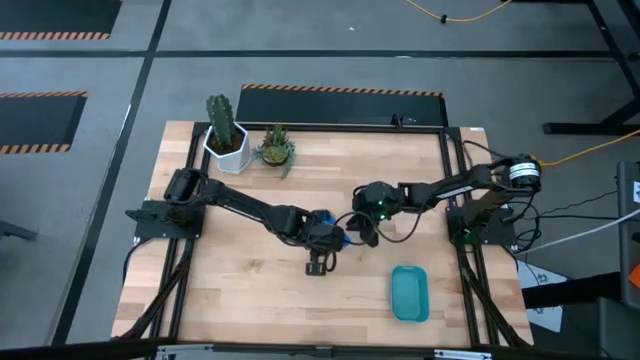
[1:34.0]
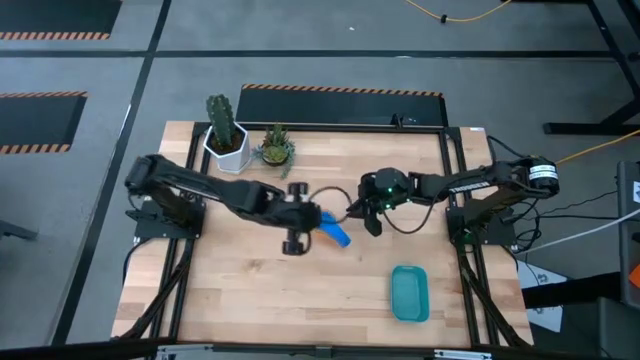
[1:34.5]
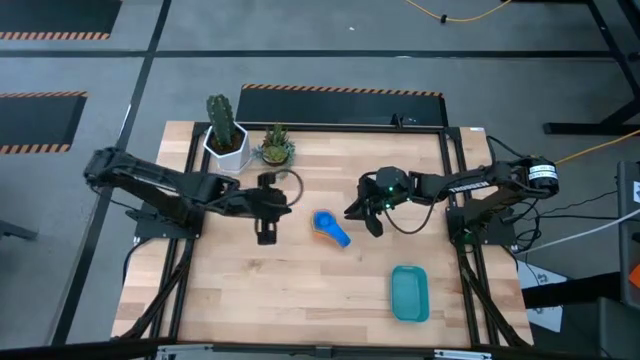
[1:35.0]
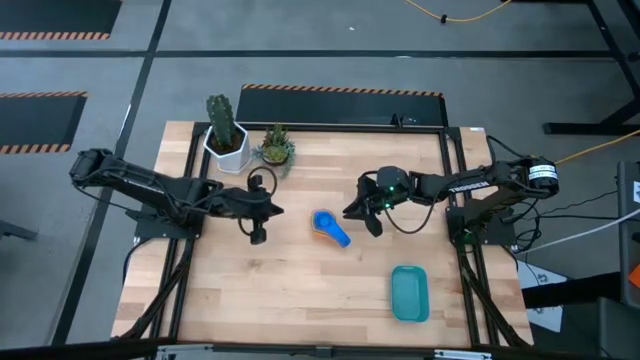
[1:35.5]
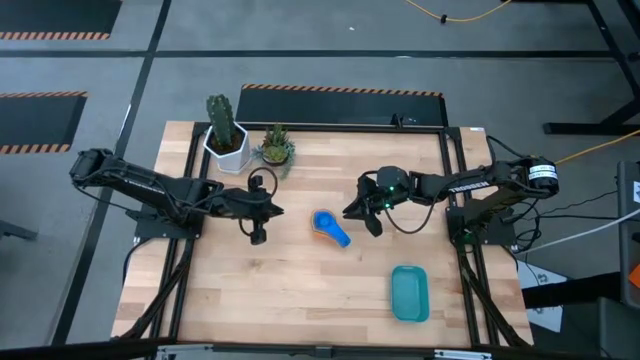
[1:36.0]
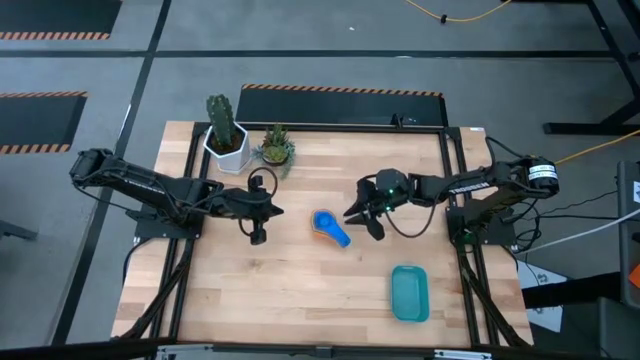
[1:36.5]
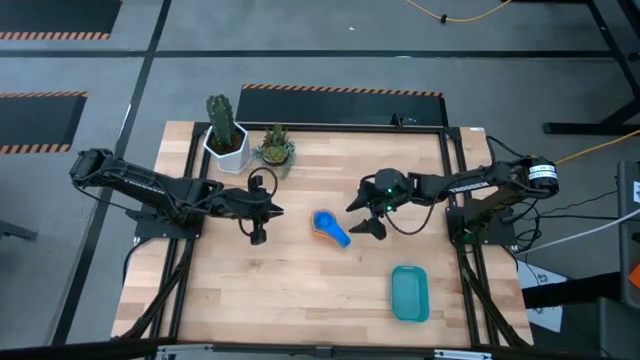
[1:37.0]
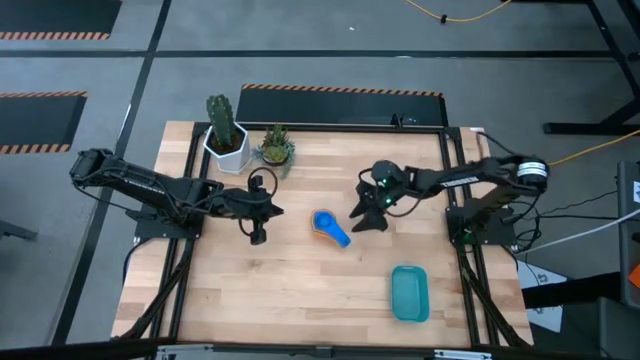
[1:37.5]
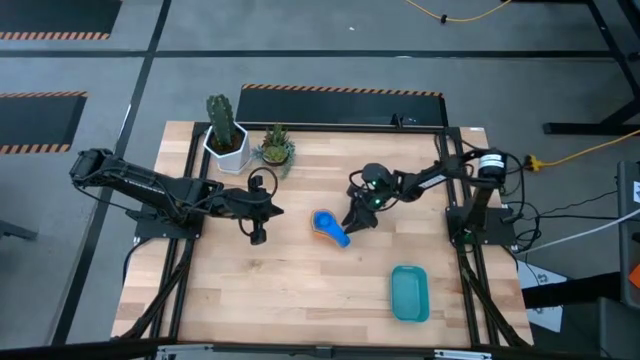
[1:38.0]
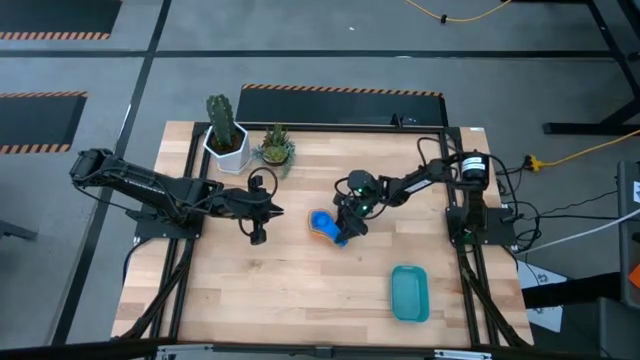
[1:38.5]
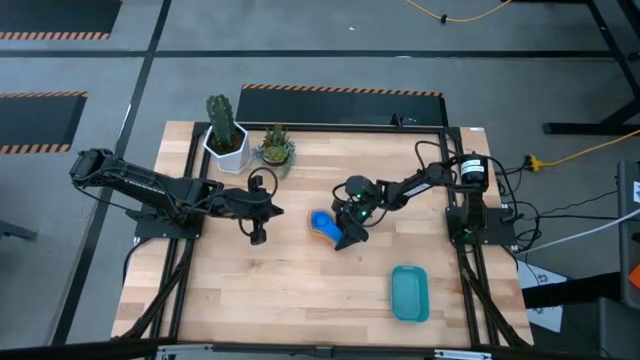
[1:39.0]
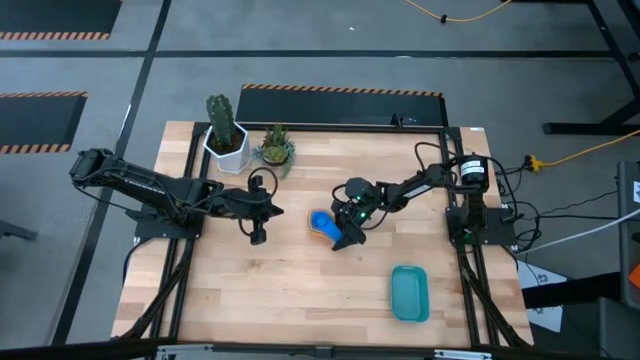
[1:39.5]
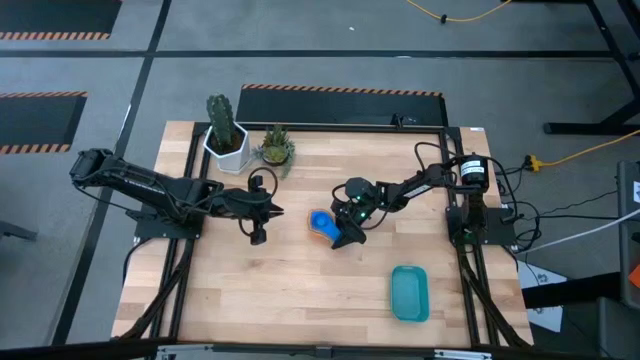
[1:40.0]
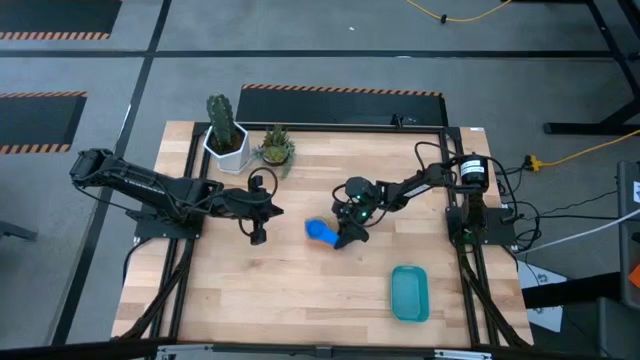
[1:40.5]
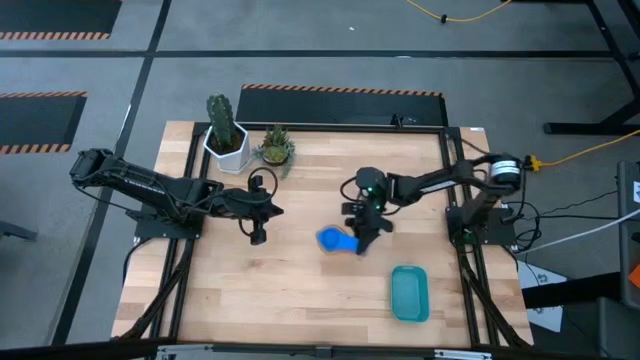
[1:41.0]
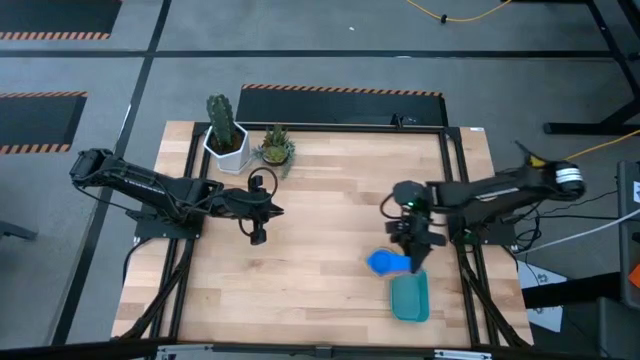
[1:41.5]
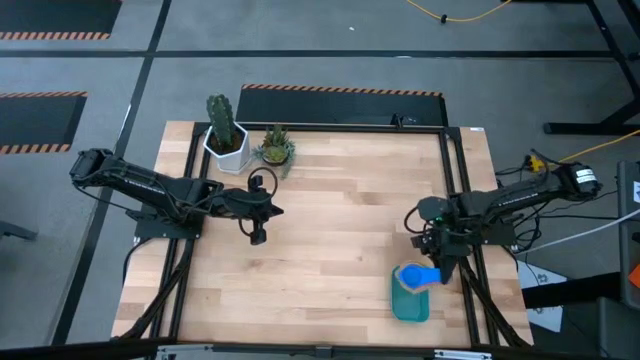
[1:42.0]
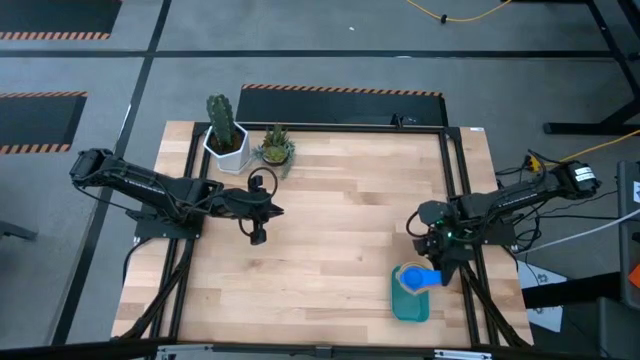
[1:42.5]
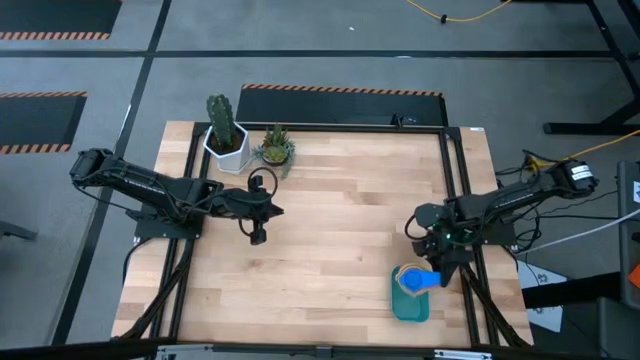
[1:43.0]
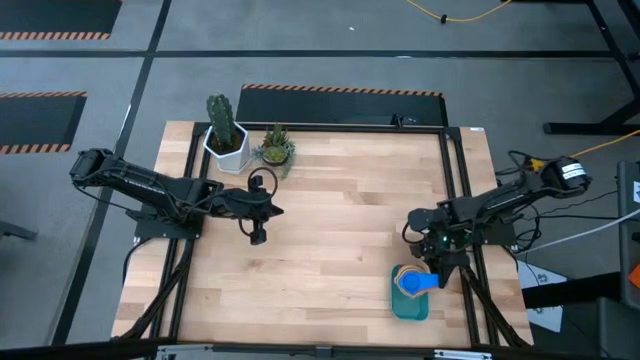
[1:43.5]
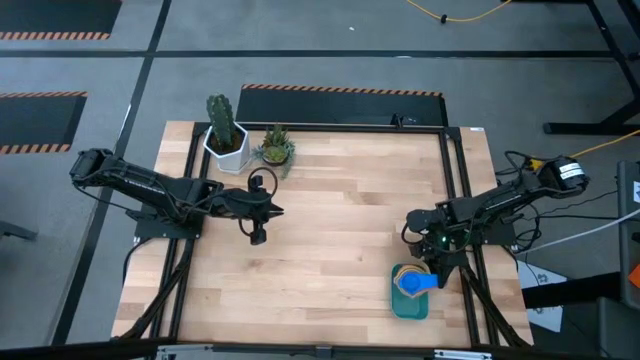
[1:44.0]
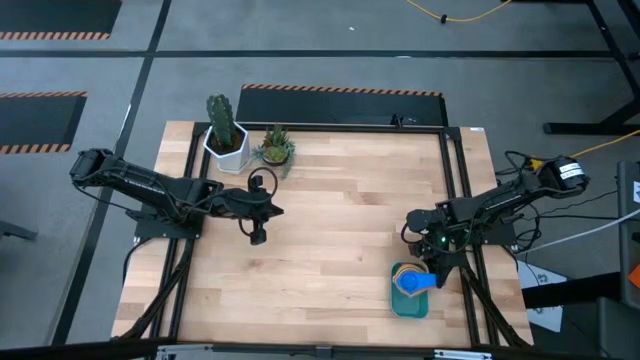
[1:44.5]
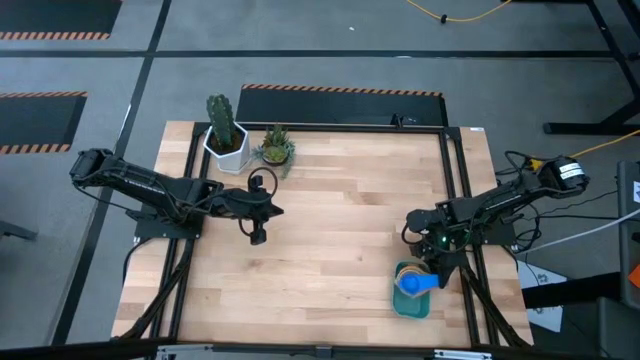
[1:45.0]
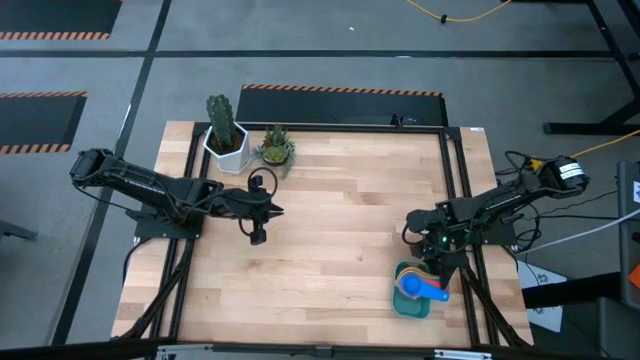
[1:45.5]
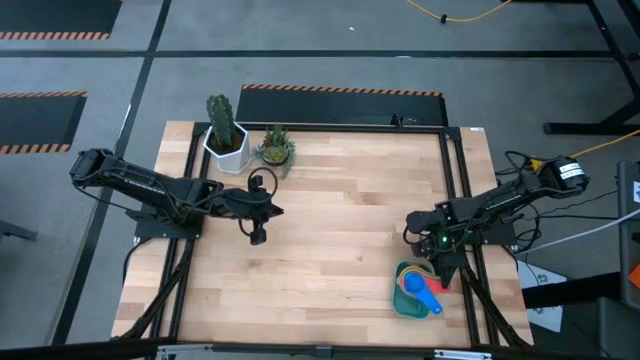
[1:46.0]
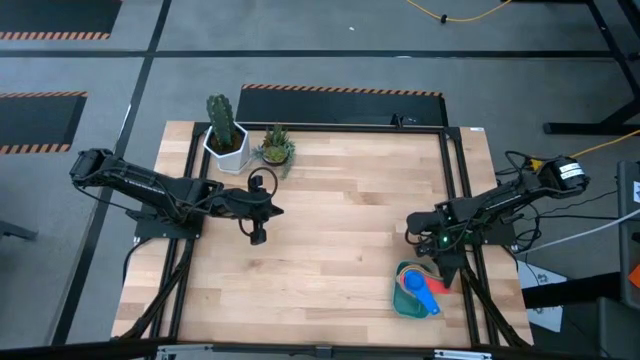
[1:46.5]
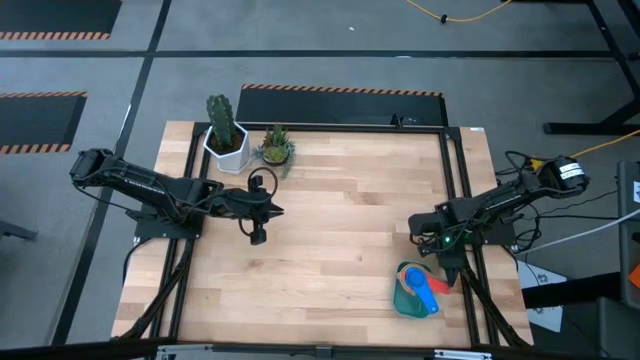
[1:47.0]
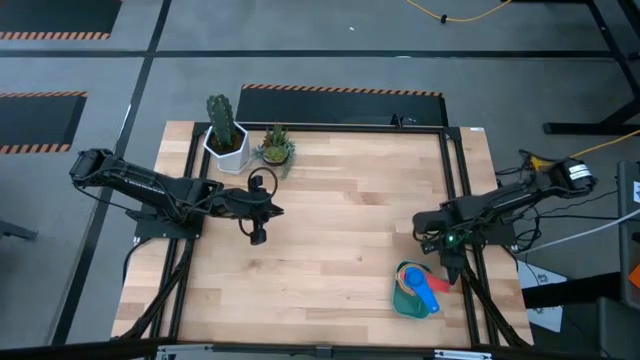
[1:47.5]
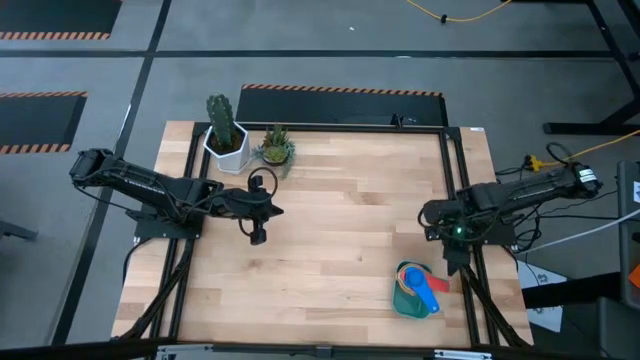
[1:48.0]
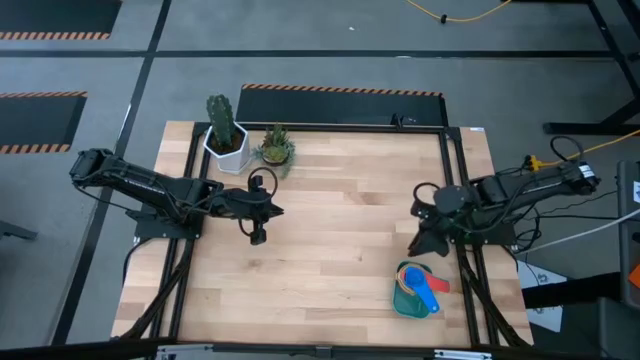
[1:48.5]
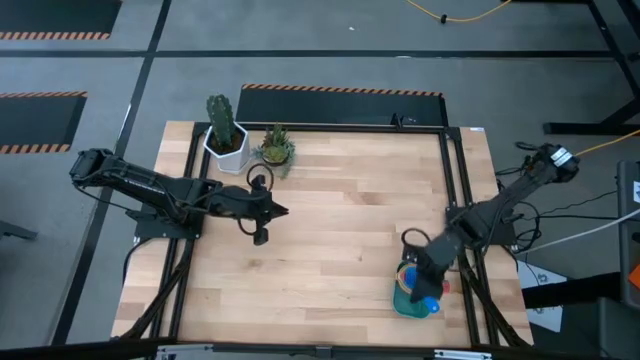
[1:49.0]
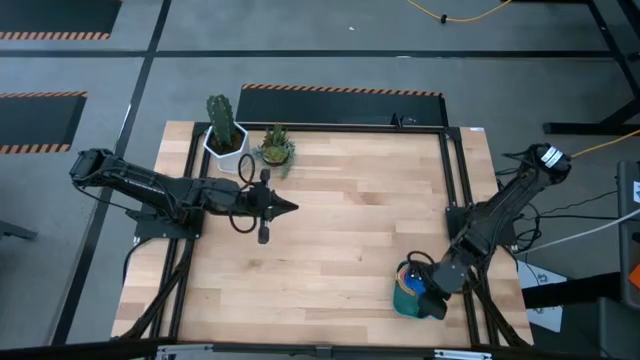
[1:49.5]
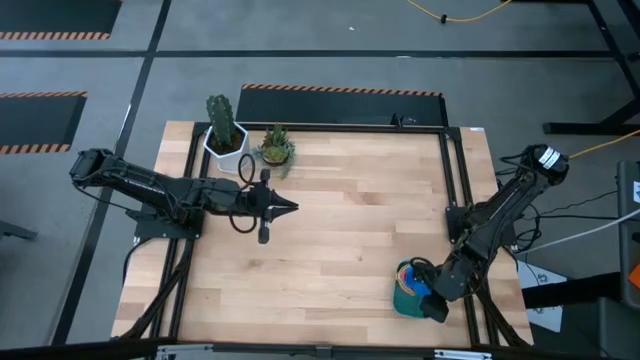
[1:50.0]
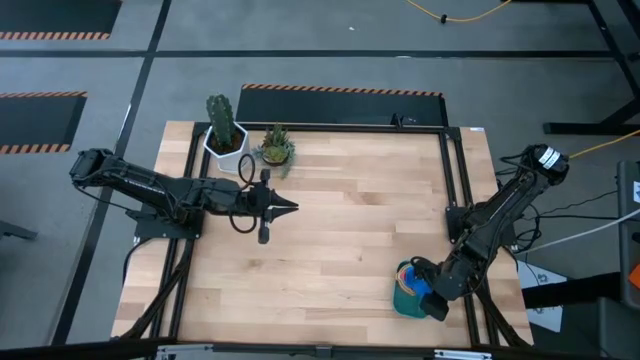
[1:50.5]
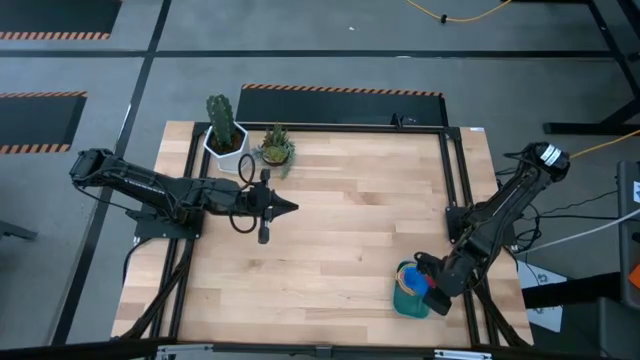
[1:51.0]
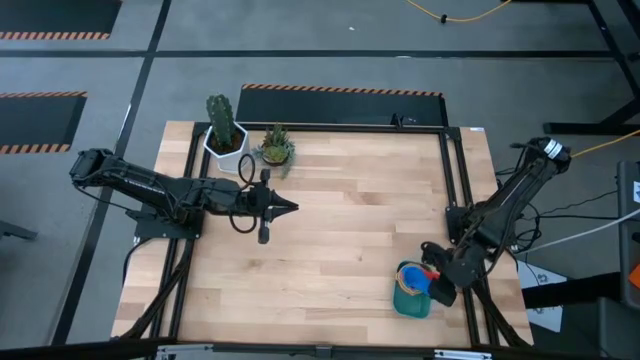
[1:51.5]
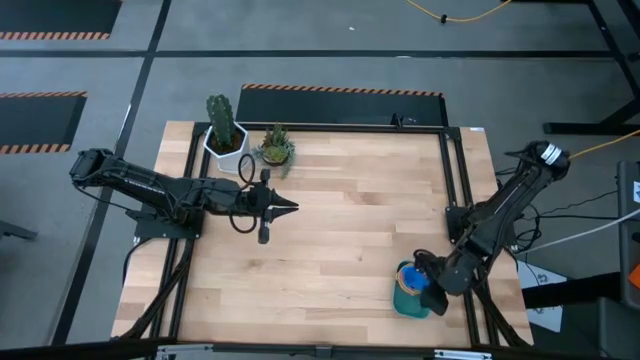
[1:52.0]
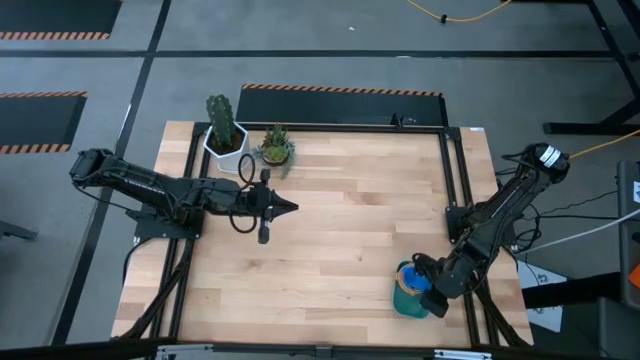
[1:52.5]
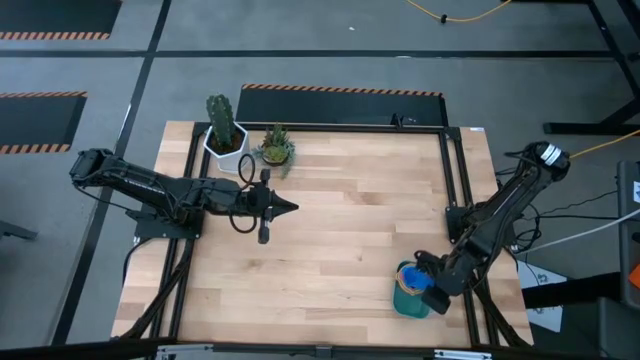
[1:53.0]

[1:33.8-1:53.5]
Task: Nest measuring cups in basket
Put the stacked measuring cups into the green bin
